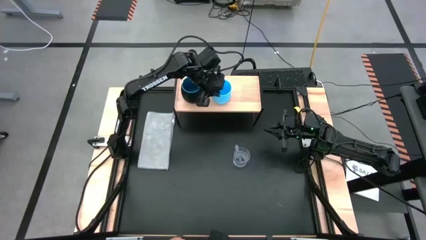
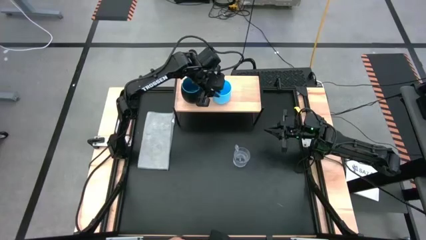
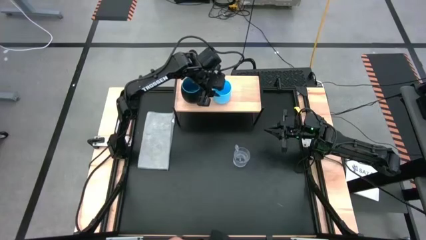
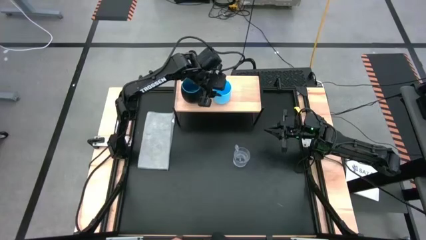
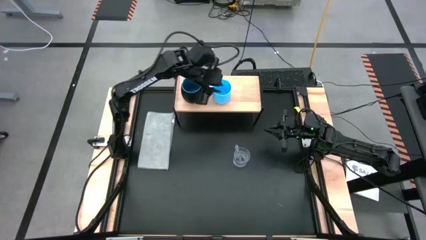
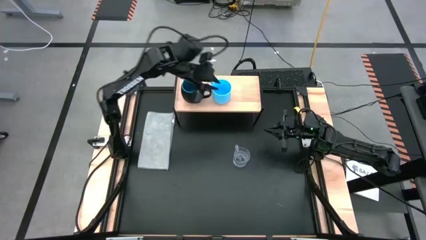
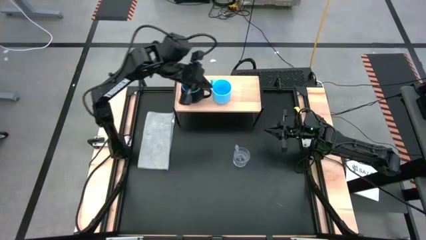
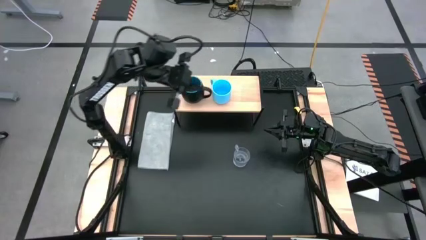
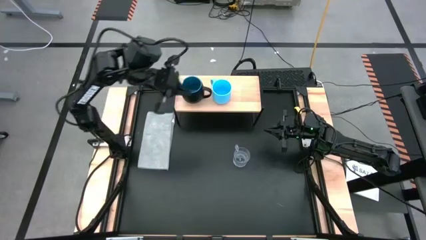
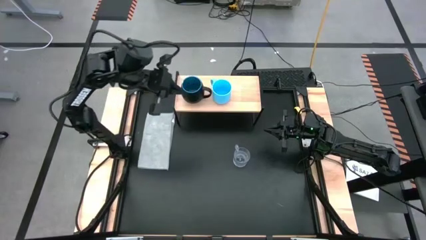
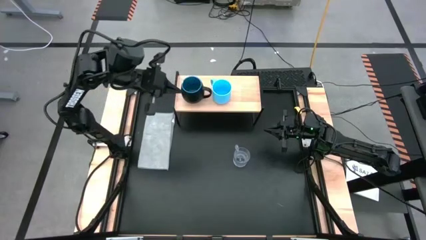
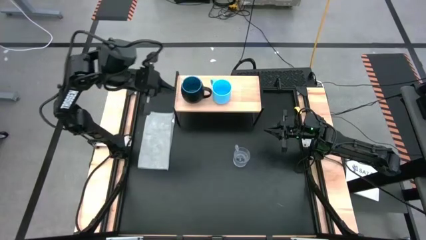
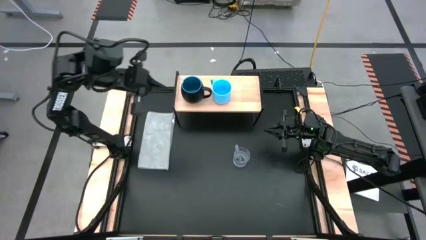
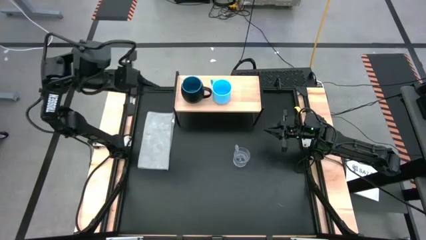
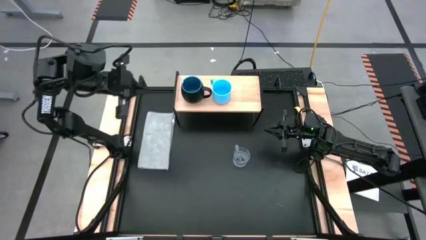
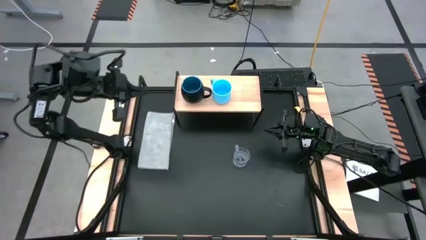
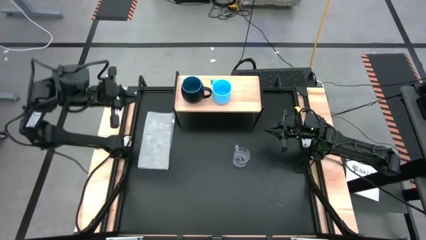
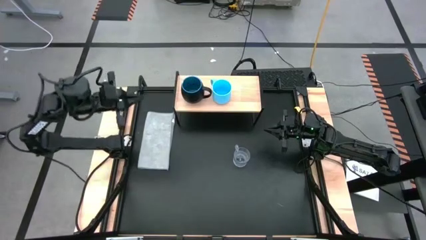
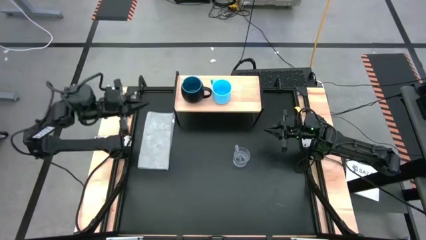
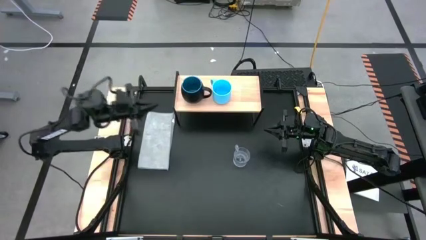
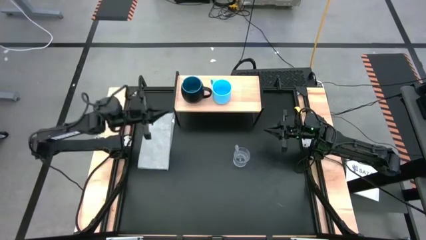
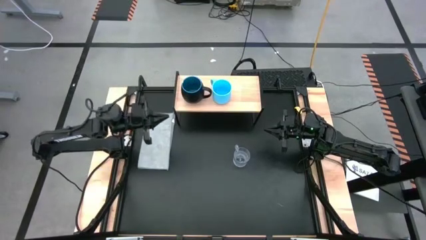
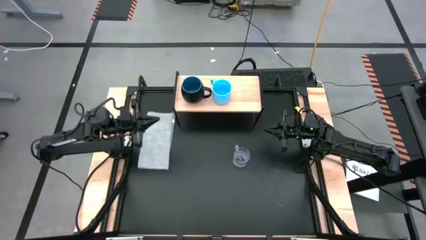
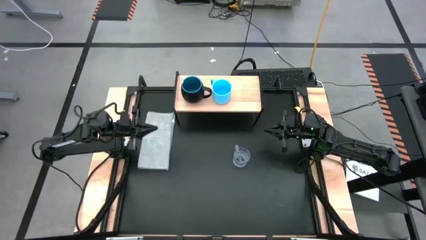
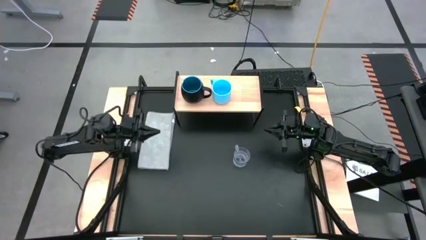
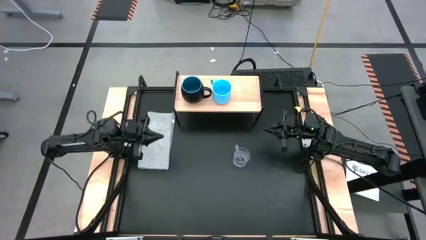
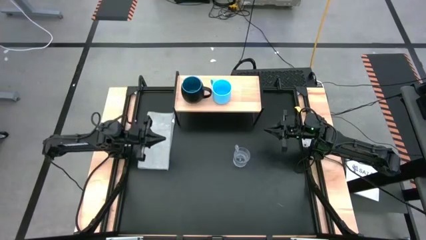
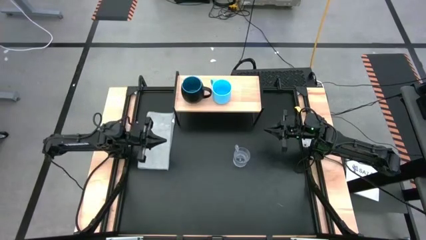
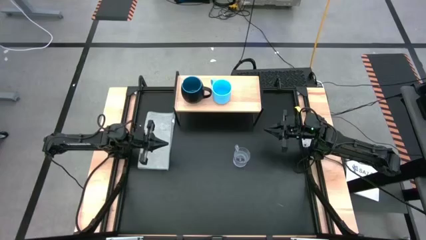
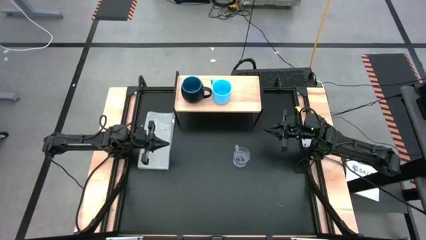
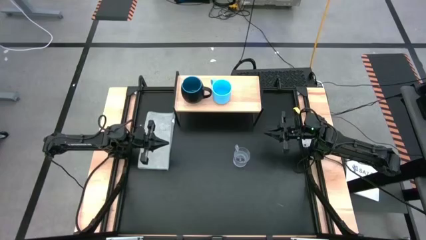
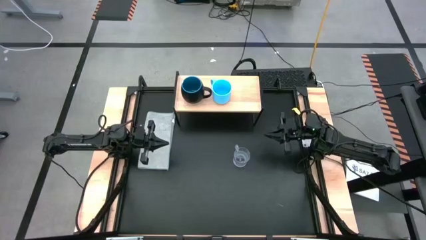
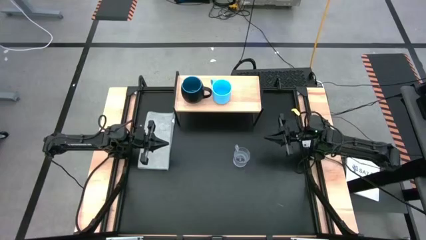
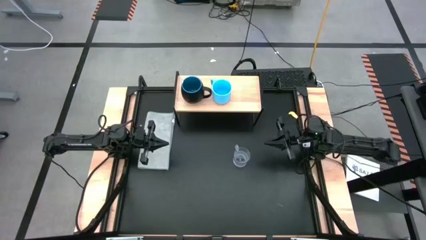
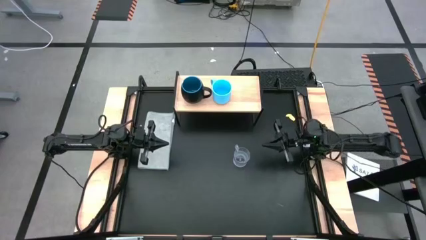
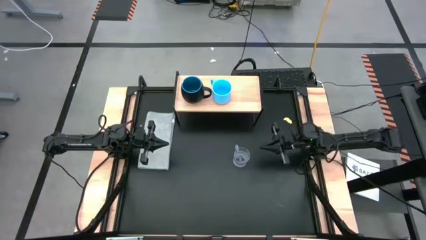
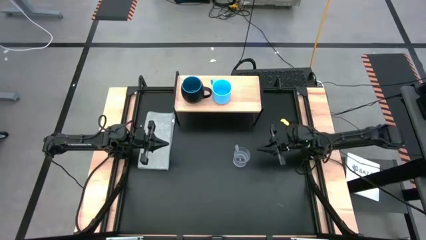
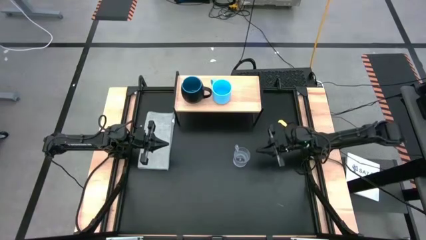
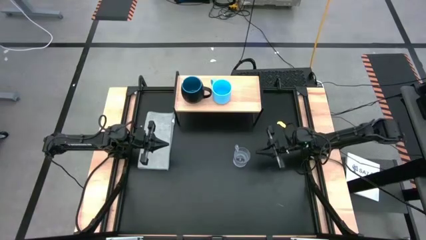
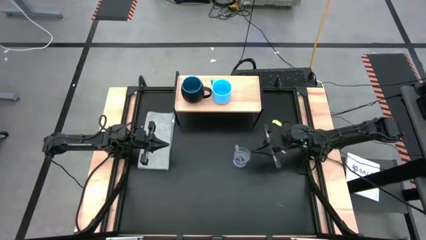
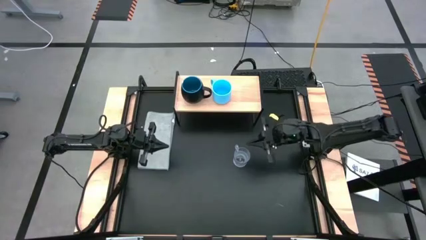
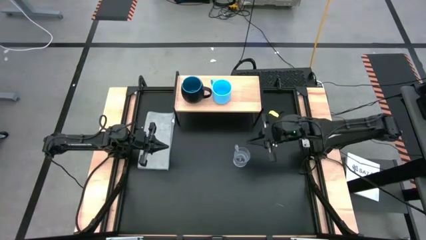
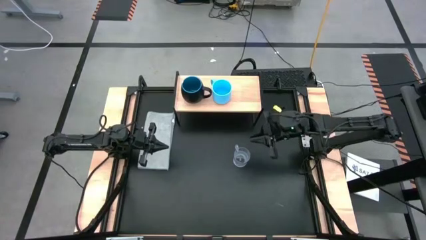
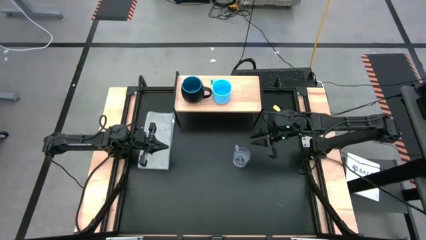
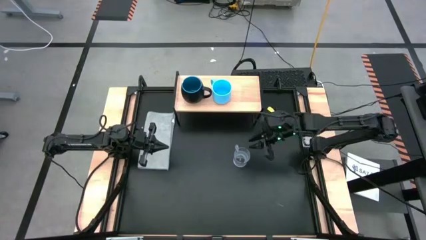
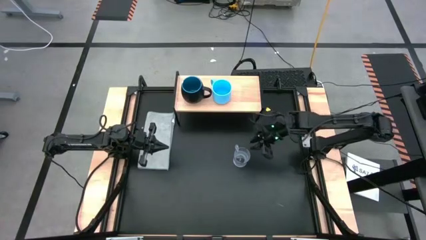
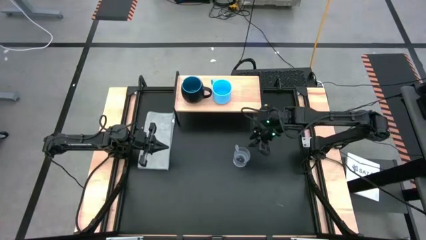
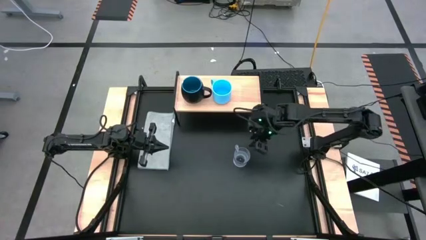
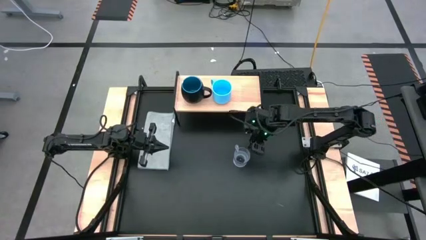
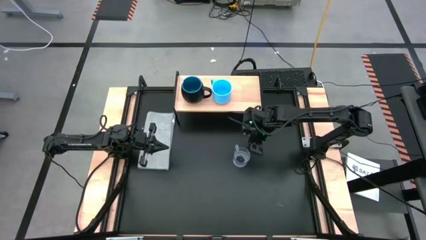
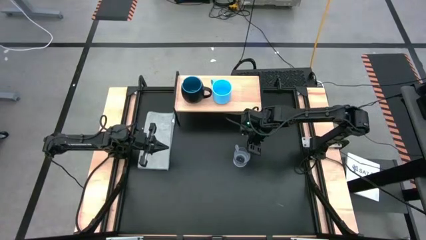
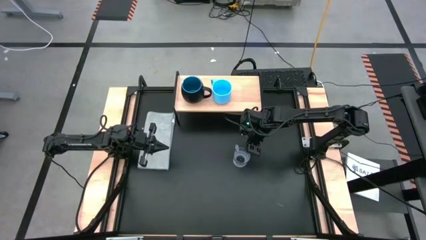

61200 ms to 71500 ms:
Task: Stack small to large cups/mugs on shelf
Put the transparent cup on the shelf

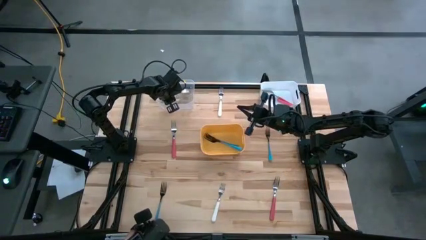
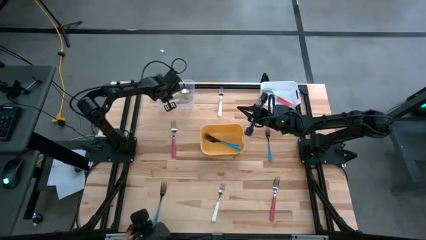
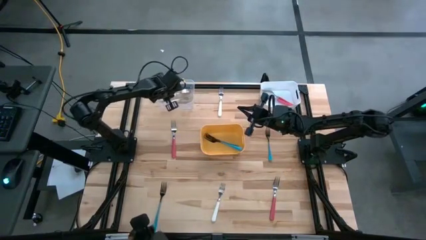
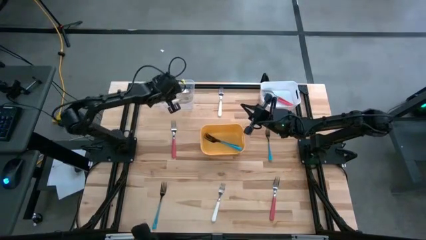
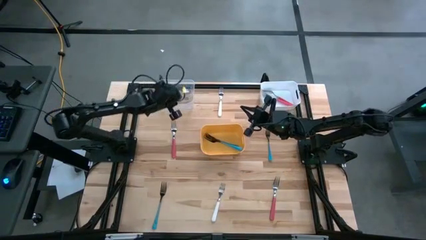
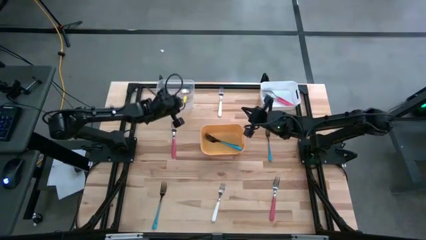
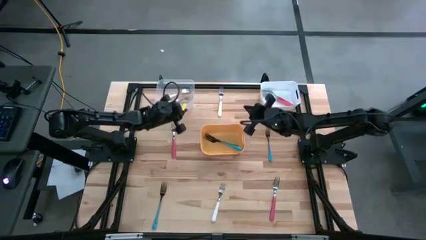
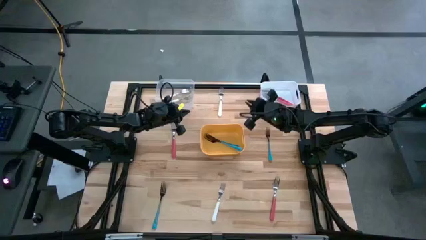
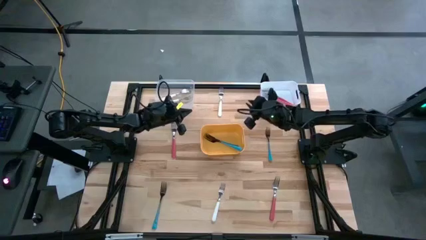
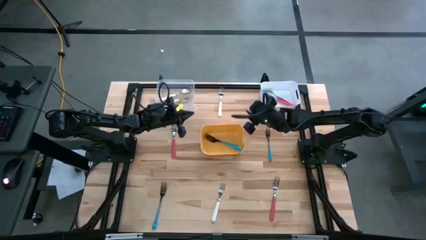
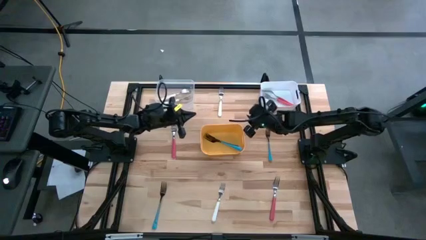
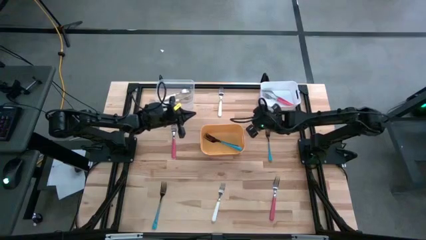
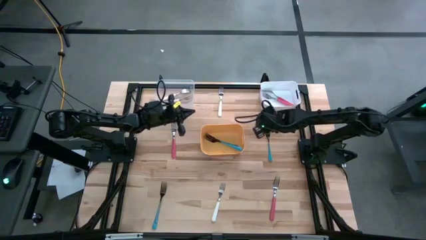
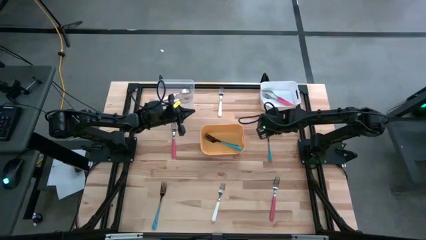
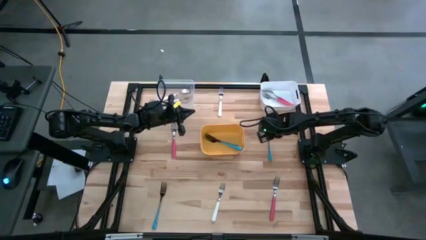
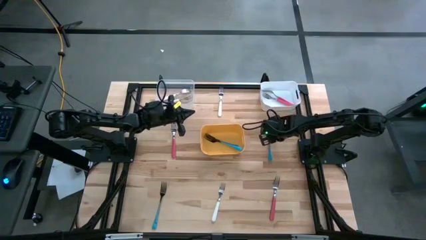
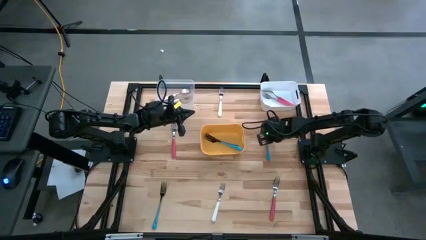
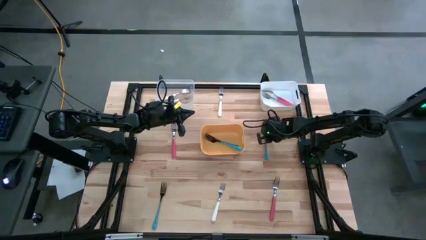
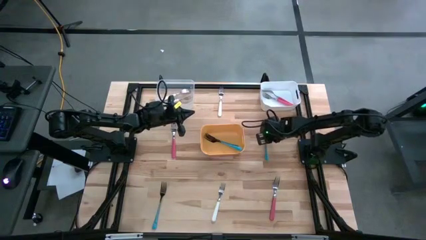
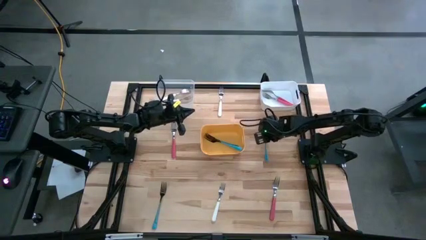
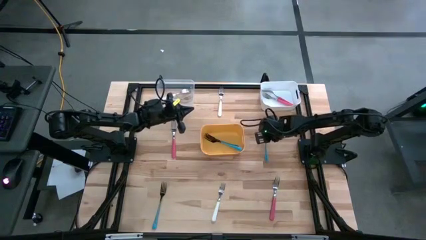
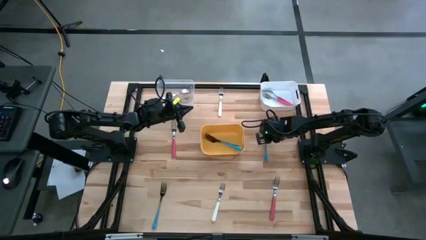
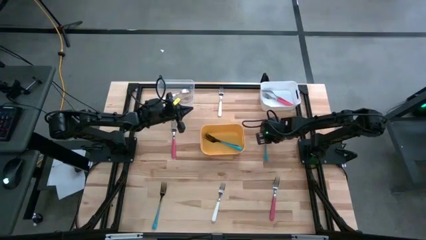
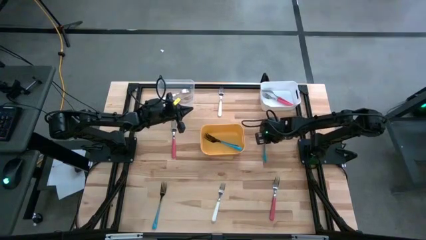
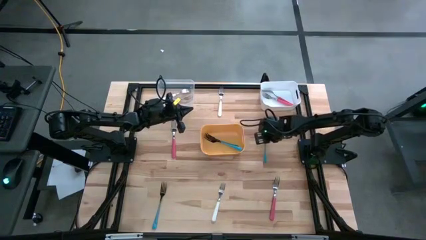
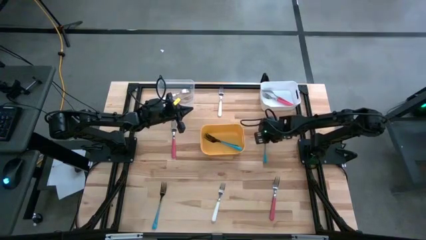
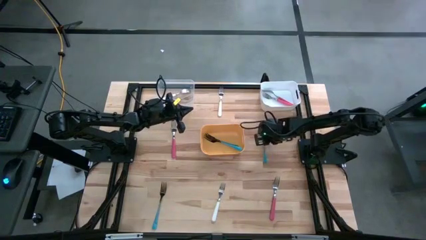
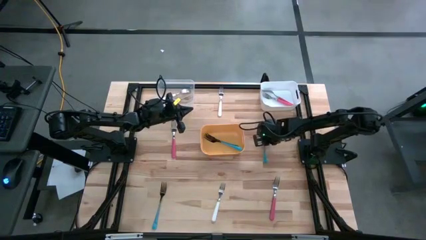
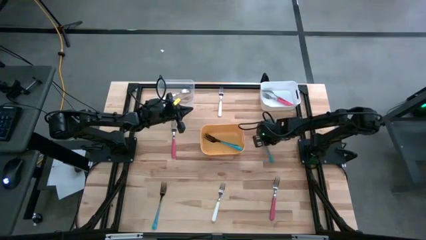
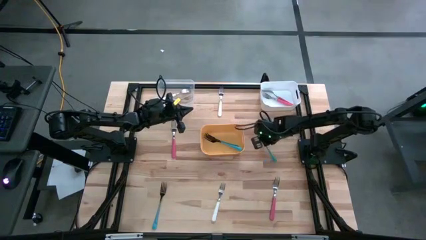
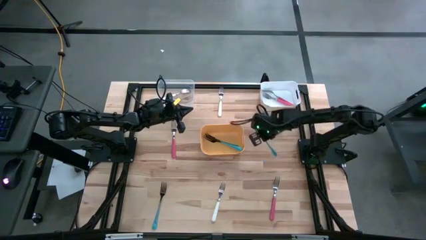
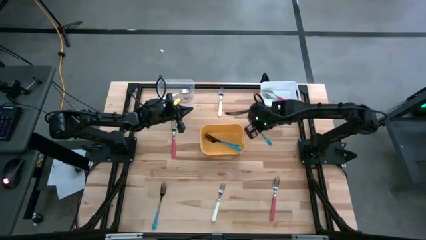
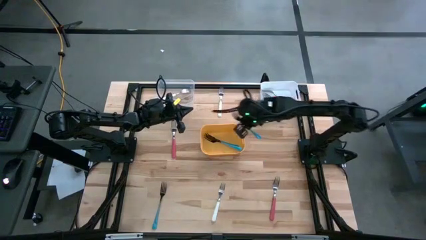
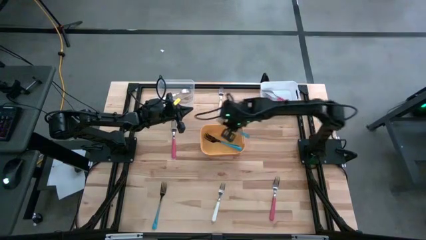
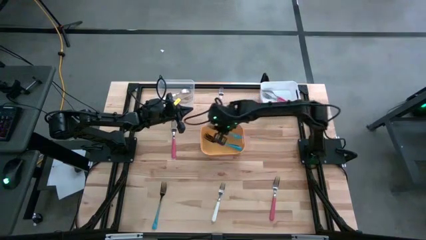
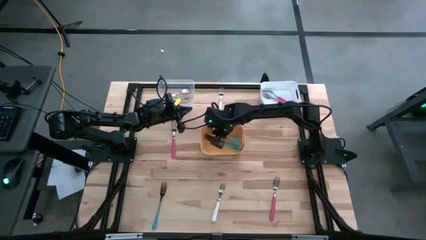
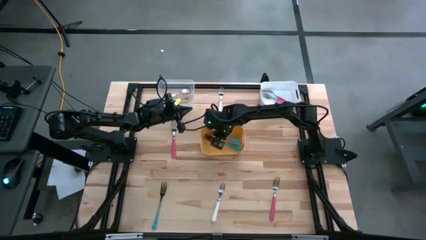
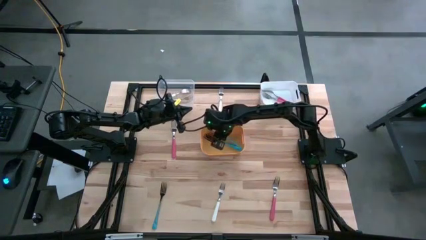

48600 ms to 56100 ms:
Task: Sort silverware by color (type)
Put the blue fork into the yellow bin
